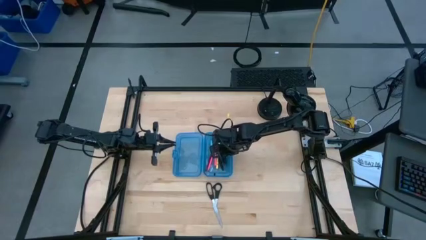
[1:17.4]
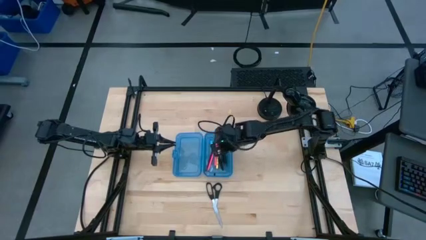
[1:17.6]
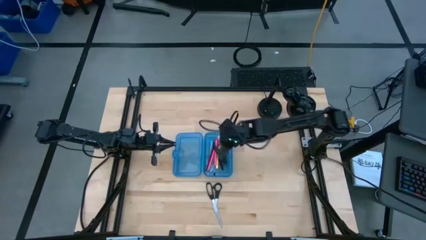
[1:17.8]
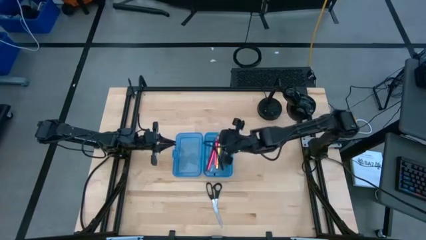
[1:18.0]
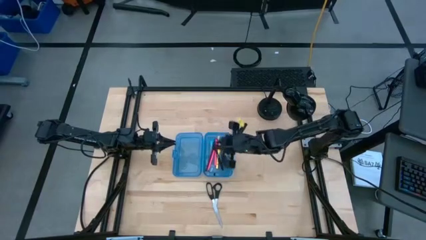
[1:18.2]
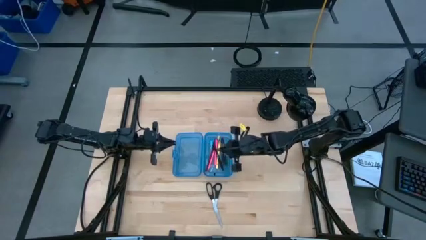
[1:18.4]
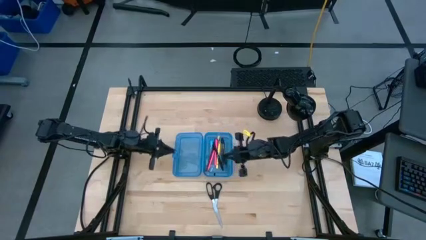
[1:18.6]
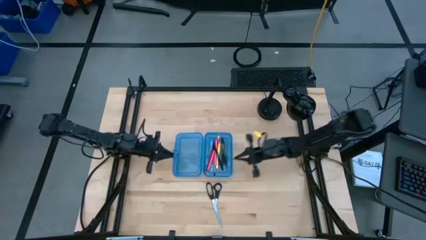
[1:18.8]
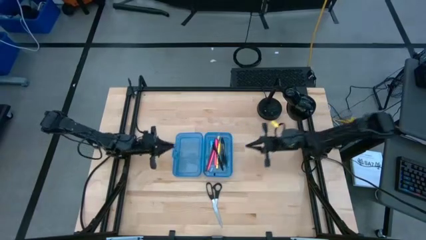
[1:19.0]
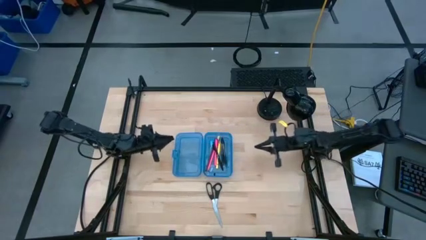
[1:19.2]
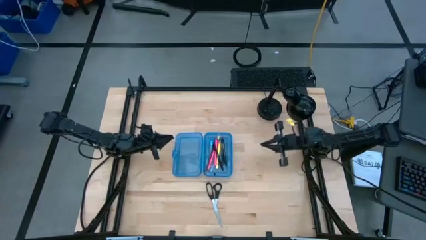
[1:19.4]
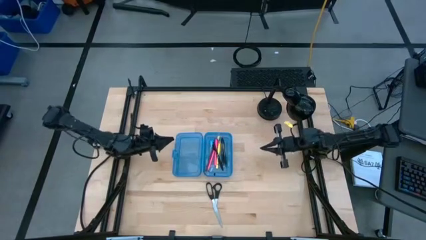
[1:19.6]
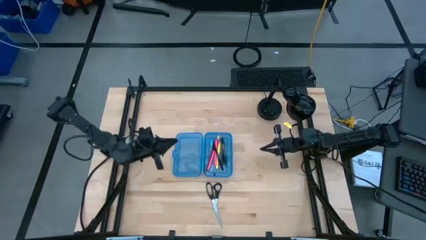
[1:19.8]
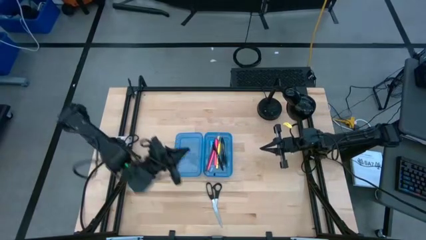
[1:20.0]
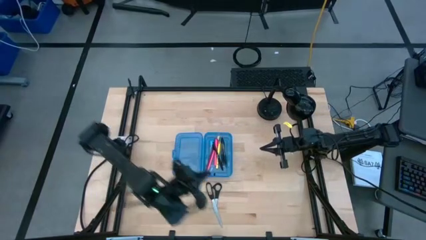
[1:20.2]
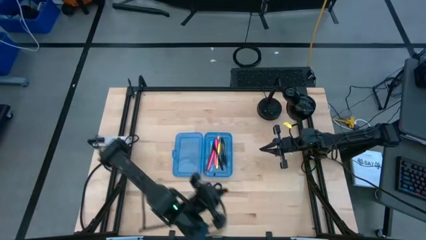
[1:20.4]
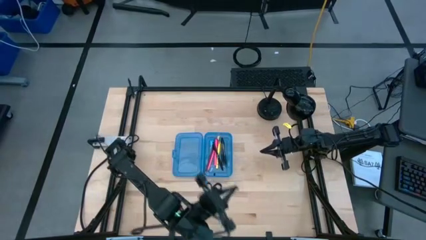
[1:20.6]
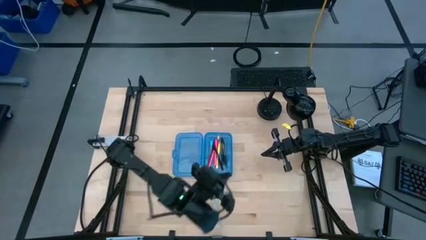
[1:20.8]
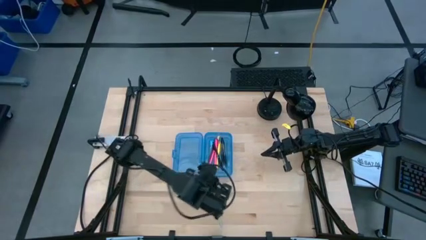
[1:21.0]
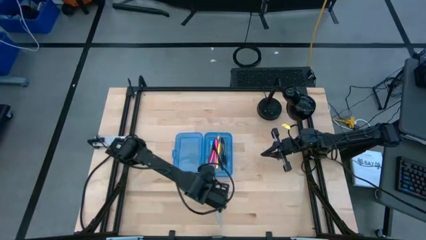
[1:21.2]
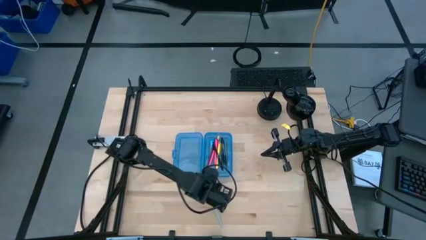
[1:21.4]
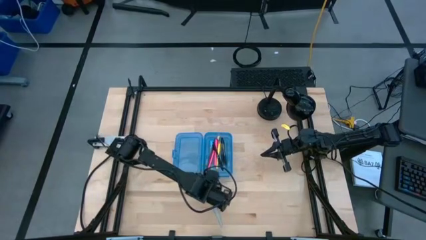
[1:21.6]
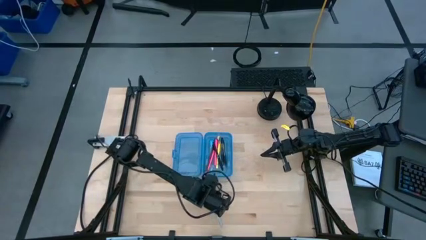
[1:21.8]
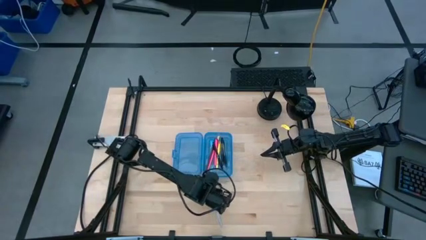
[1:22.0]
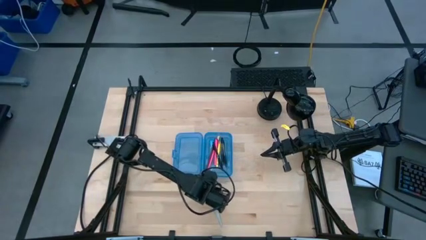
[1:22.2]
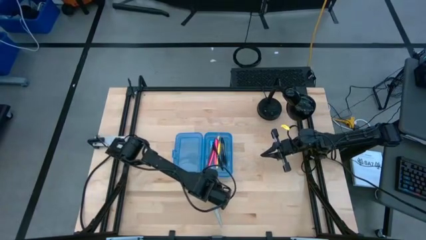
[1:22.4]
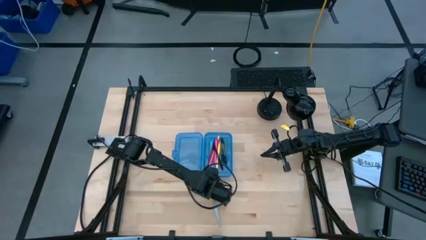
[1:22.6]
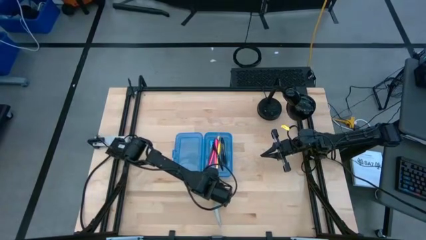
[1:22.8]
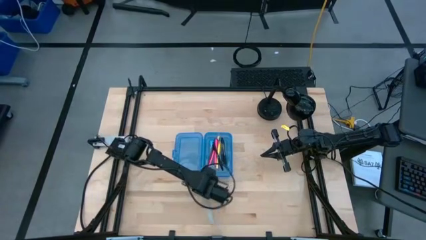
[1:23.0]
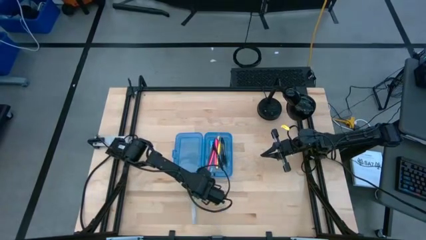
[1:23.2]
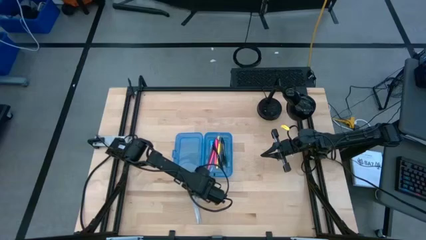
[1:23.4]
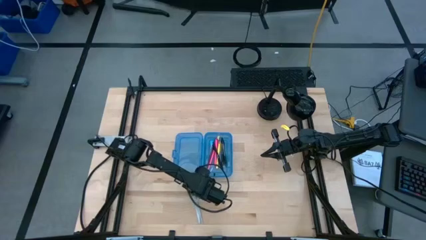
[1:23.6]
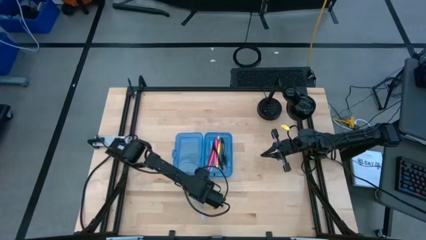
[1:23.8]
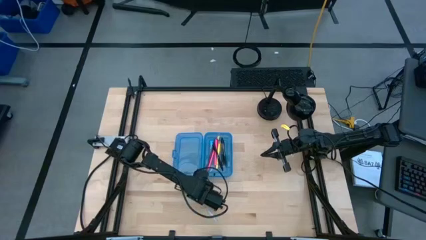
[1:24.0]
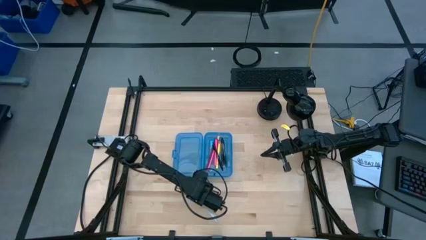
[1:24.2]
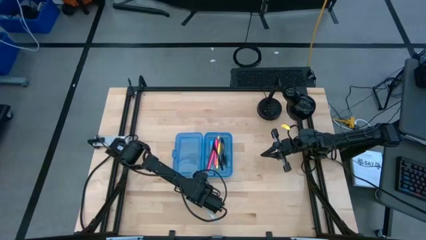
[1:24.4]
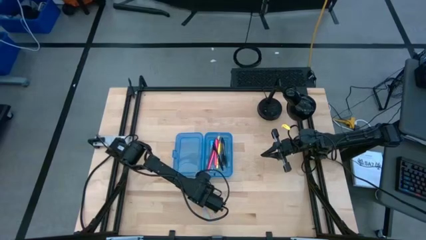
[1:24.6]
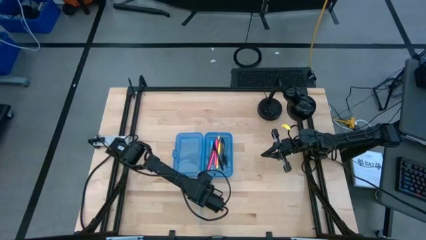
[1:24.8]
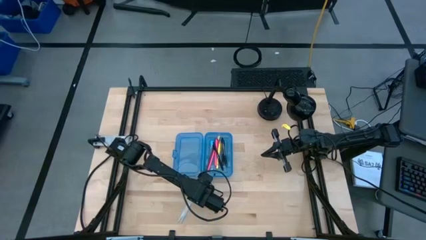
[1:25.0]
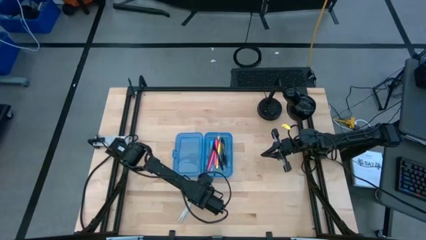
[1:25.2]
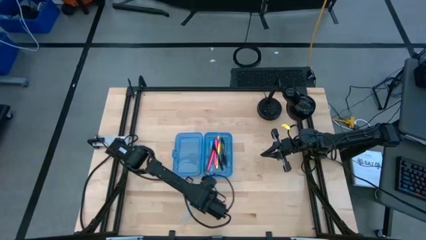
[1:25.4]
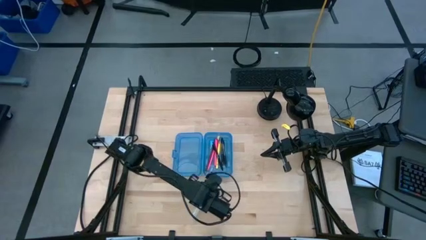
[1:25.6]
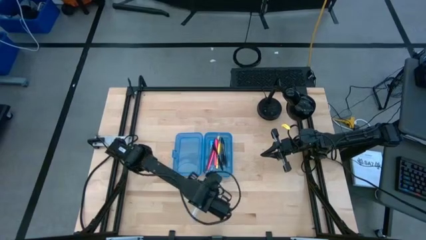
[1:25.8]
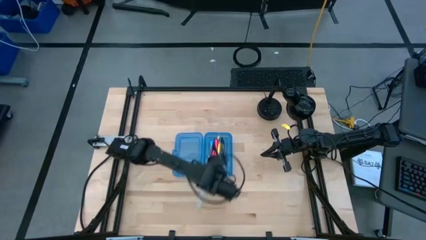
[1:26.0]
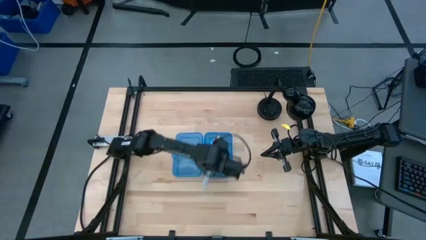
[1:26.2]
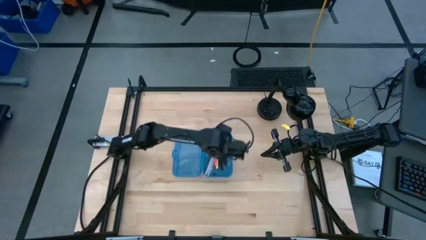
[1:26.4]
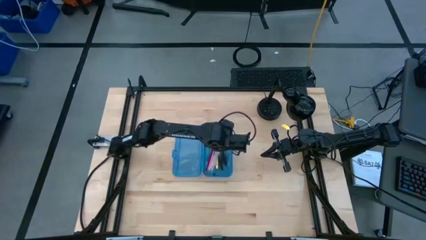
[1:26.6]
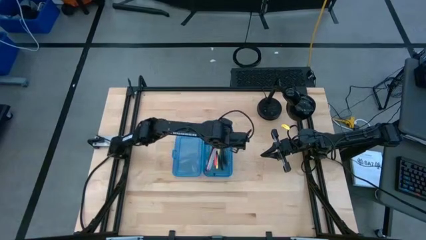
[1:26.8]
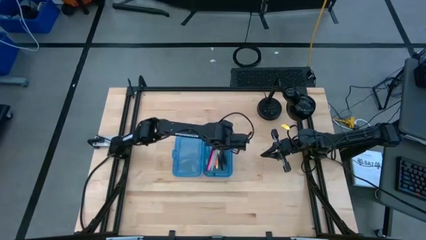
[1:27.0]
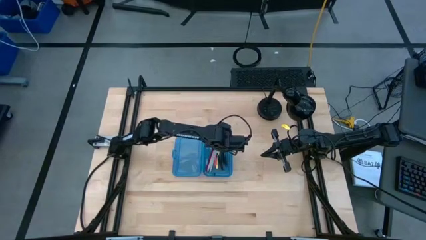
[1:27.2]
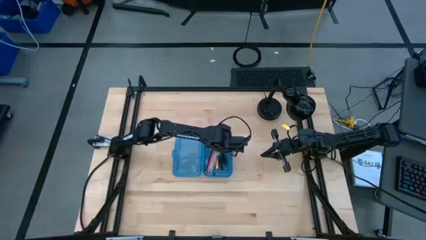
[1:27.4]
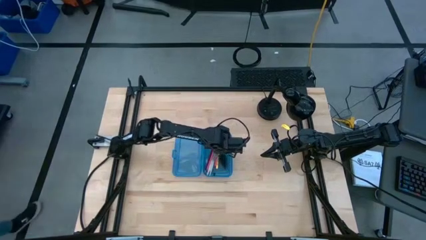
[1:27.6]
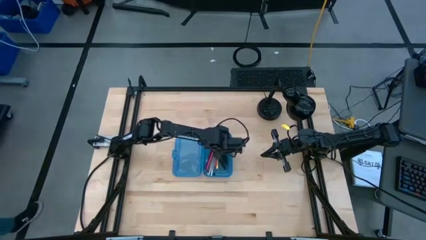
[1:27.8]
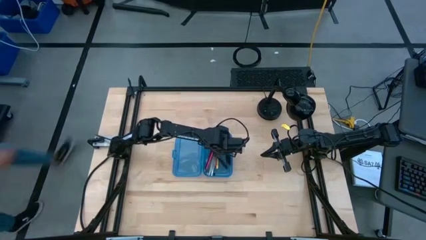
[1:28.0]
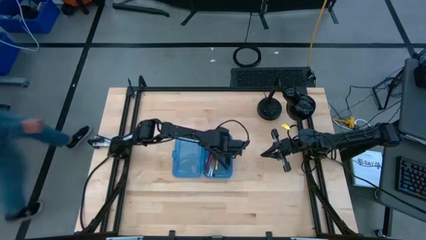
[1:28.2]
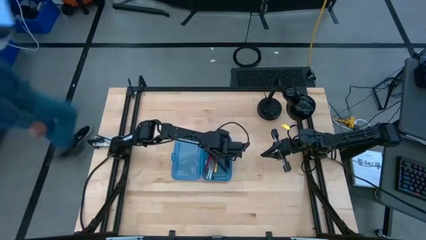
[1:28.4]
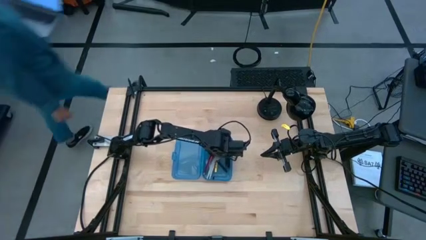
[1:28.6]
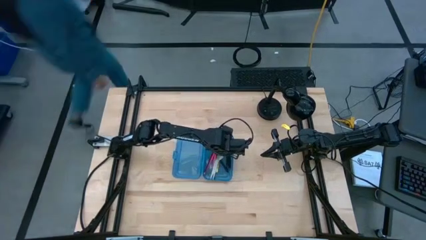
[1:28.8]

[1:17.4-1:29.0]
Task: Pick & place school supplies into a supply box
Put the scissors into the blue pencil box

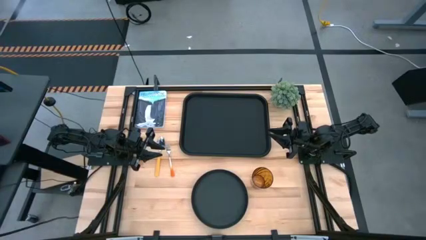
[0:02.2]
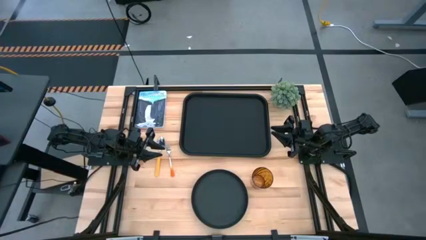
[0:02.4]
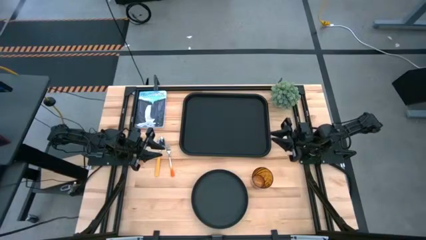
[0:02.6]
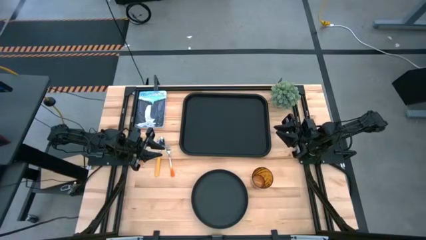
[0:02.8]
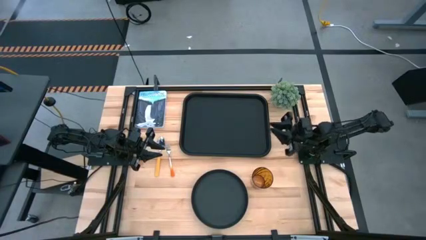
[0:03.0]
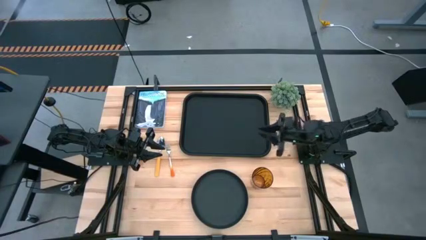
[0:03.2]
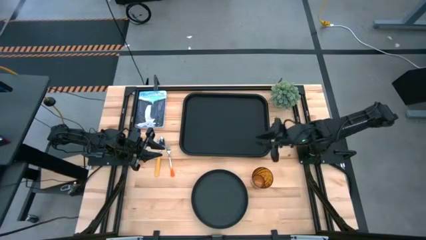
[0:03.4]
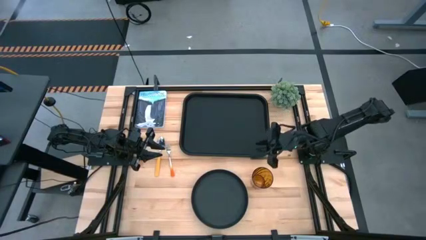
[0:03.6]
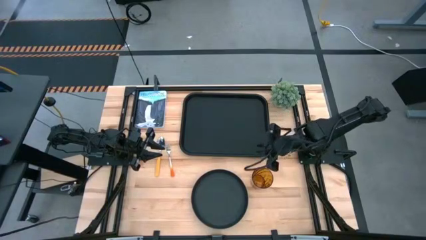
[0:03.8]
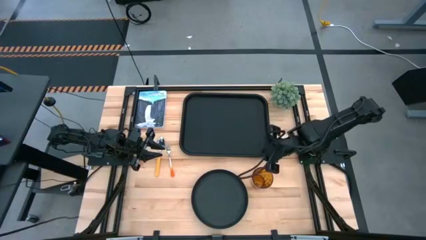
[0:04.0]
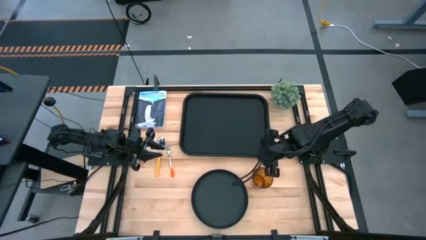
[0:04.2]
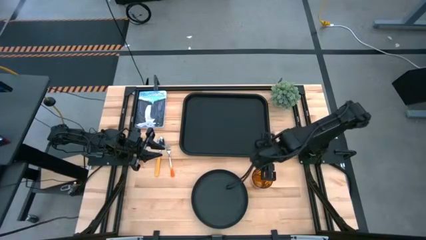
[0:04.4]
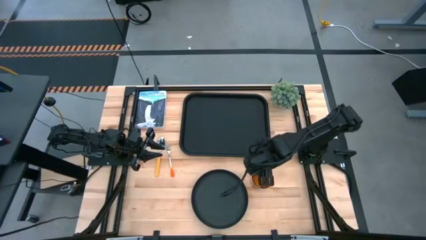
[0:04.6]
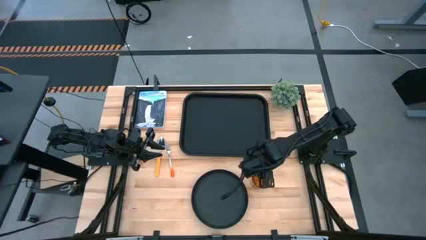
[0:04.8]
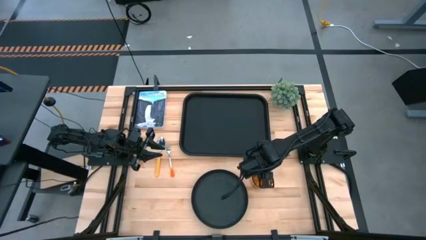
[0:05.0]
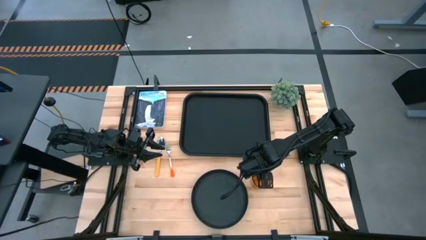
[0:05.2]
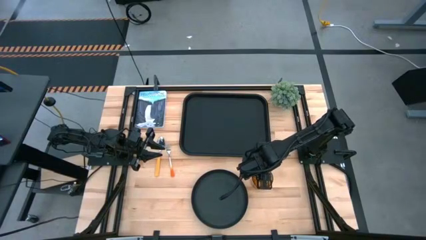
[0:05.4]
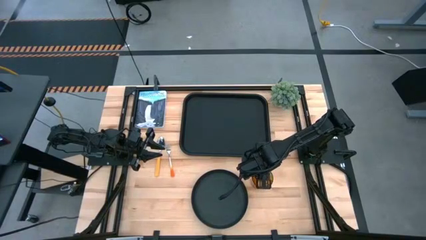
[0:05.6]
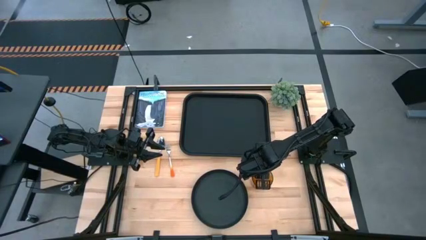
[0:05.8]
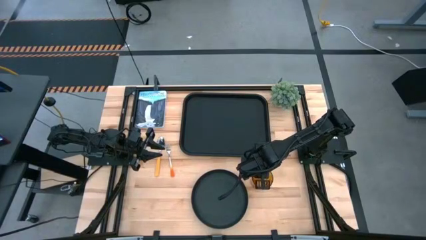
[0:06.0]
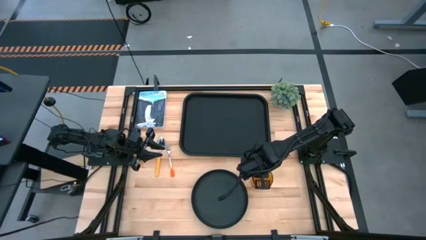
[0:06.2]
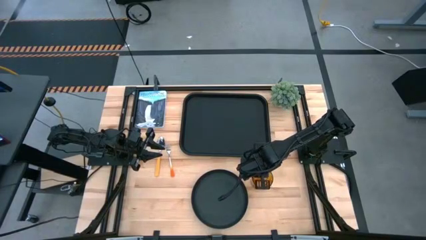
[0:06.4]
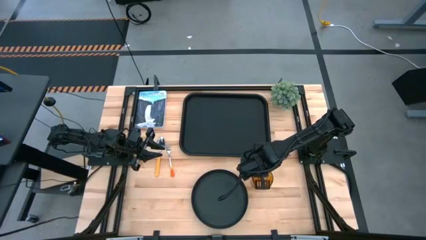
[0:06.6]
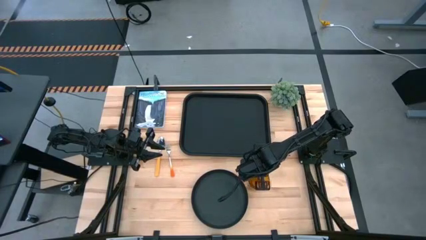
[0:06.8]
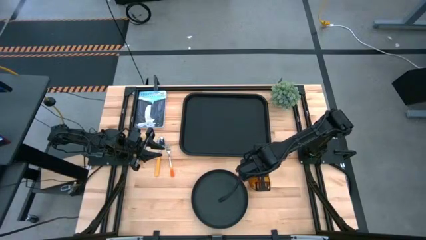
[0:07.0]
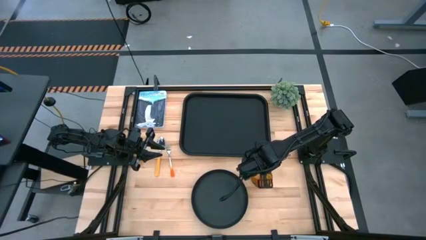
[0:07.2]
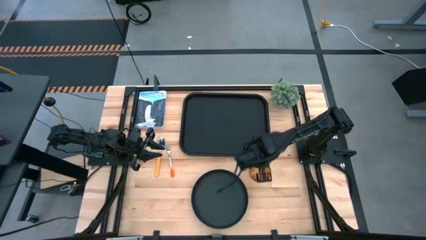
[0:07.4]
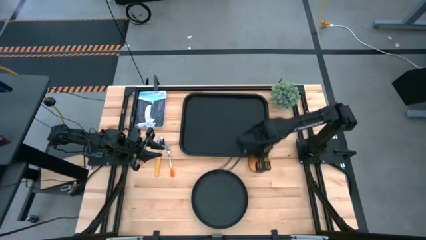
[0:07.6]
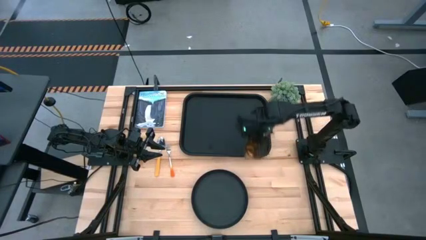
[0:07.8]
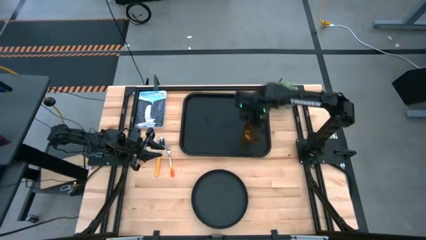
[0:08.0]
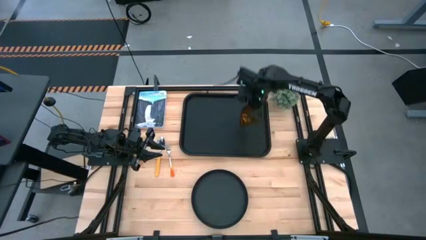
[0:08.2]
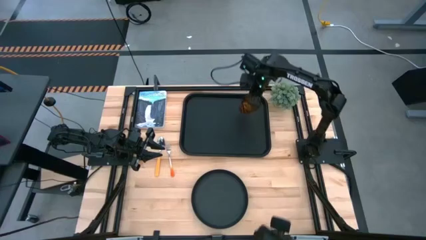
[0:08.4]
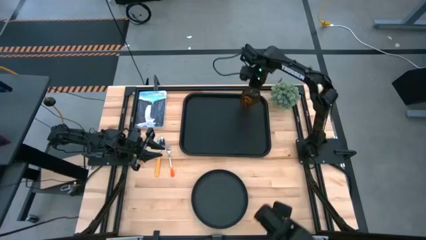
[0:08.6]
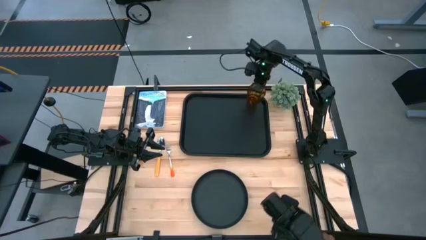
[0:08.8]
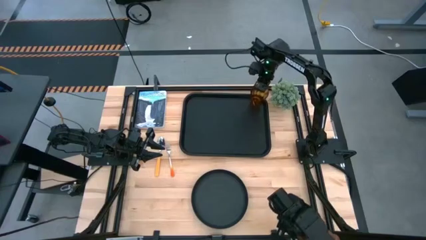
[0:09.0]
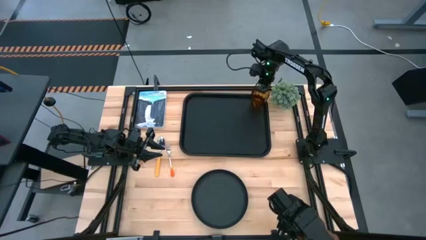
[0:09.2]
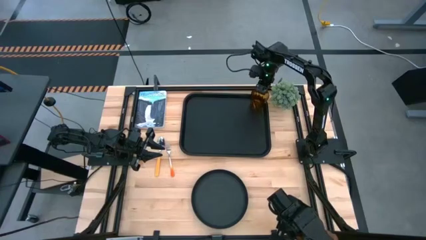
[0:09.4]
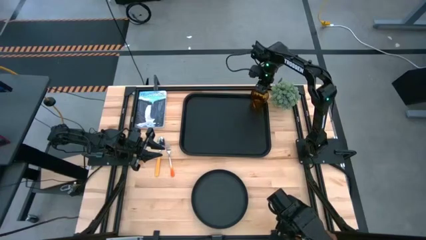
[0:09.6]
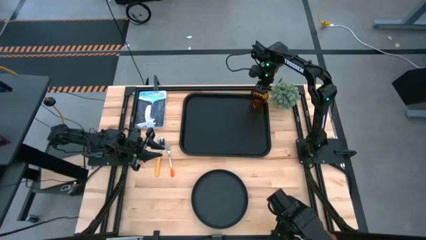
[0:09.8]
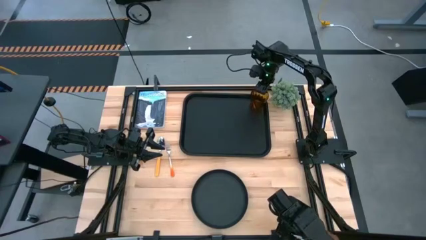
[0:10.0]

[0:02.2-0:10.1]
Task: Pick and place plate/cup/fork/spoon on tray
Put the orange cup on the black tray
